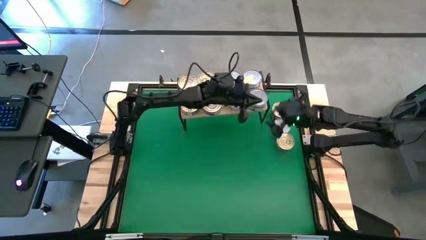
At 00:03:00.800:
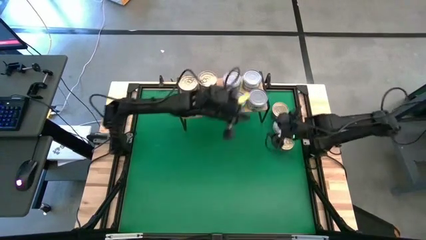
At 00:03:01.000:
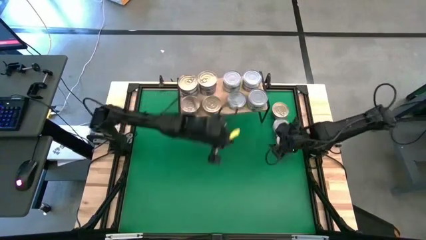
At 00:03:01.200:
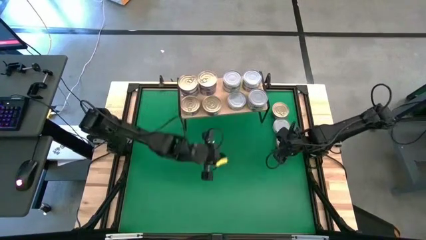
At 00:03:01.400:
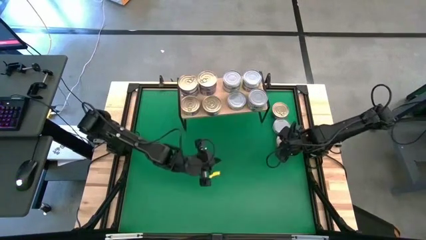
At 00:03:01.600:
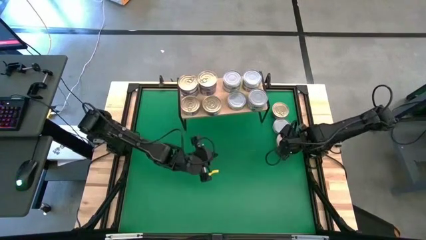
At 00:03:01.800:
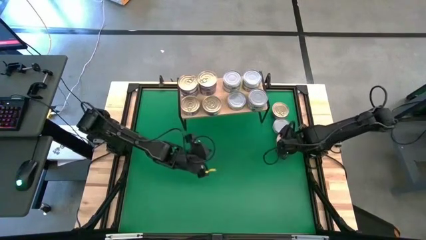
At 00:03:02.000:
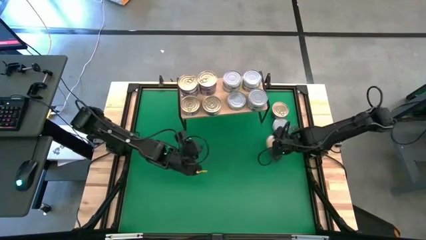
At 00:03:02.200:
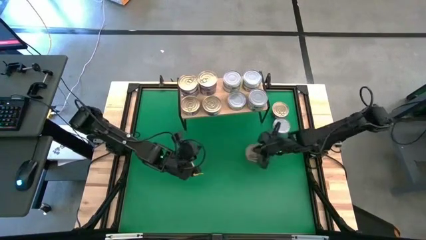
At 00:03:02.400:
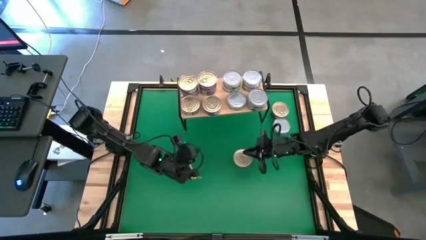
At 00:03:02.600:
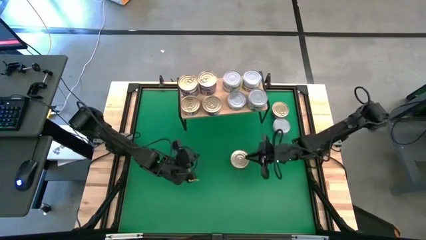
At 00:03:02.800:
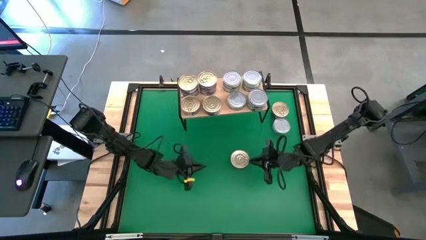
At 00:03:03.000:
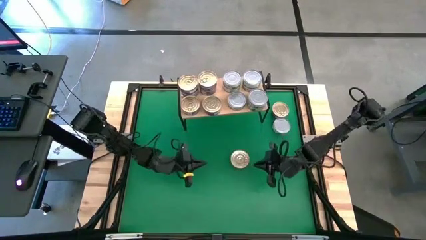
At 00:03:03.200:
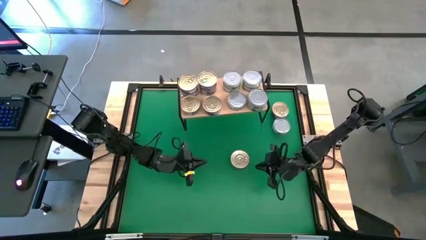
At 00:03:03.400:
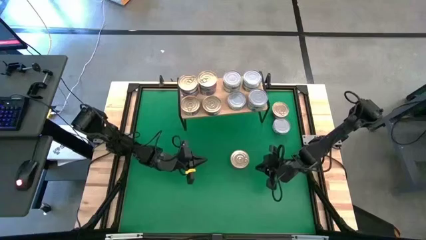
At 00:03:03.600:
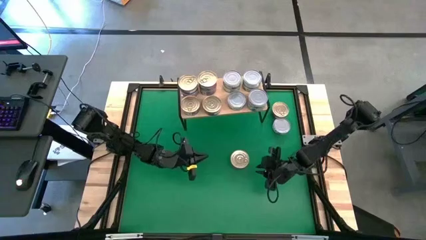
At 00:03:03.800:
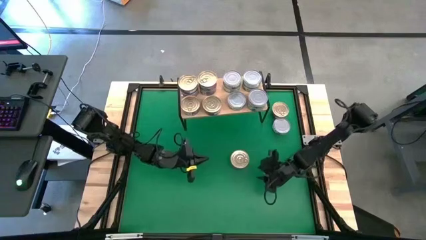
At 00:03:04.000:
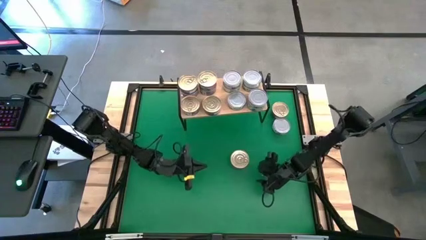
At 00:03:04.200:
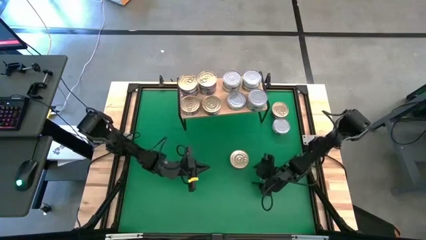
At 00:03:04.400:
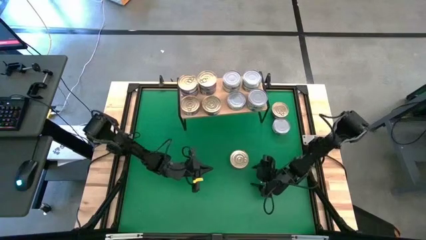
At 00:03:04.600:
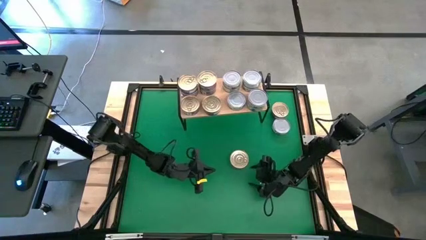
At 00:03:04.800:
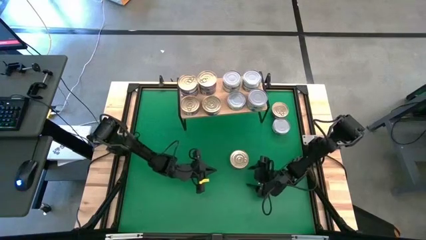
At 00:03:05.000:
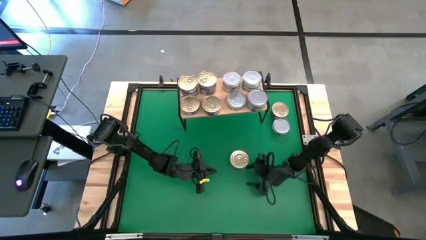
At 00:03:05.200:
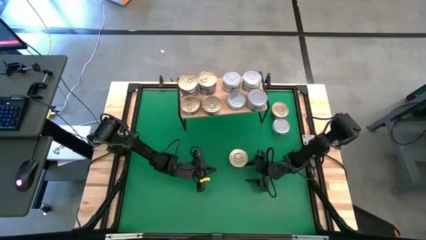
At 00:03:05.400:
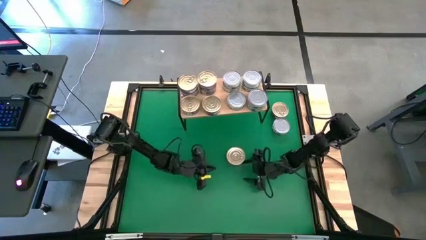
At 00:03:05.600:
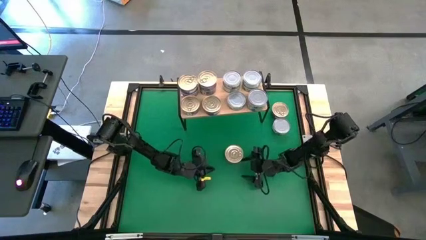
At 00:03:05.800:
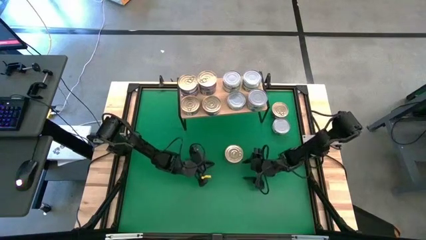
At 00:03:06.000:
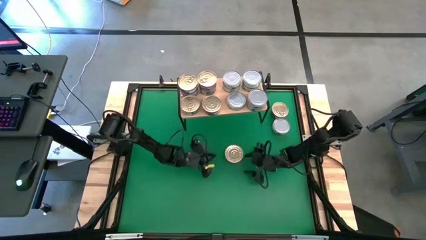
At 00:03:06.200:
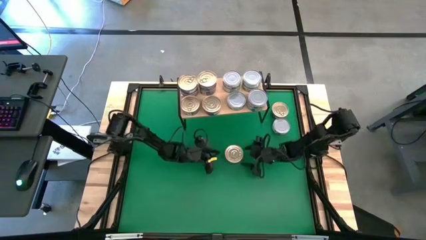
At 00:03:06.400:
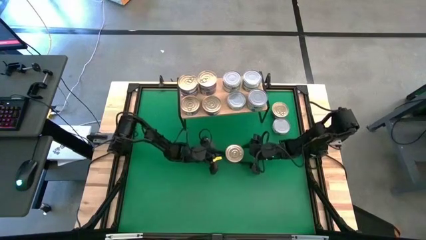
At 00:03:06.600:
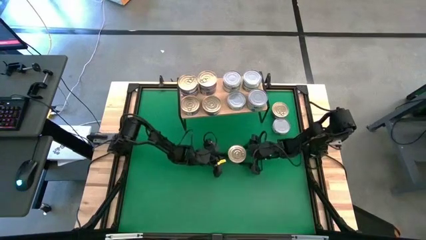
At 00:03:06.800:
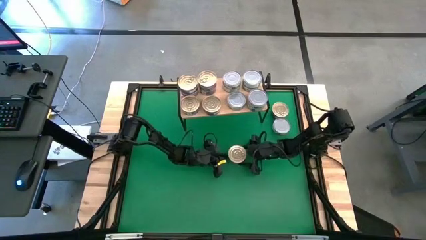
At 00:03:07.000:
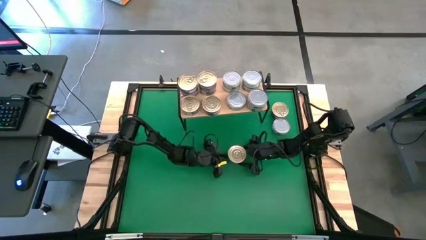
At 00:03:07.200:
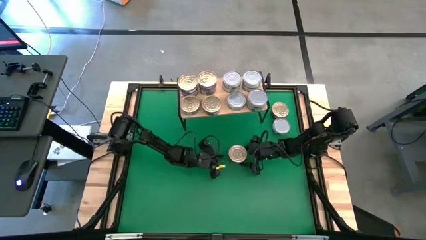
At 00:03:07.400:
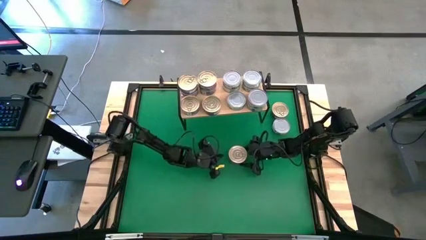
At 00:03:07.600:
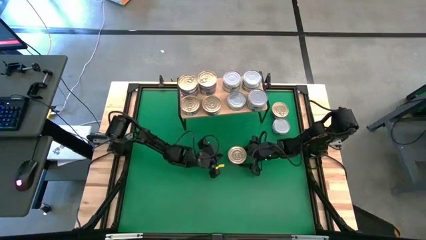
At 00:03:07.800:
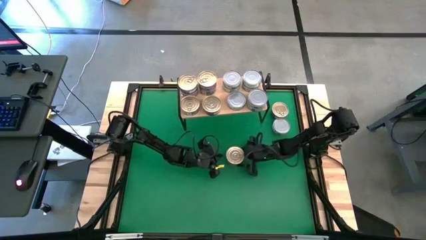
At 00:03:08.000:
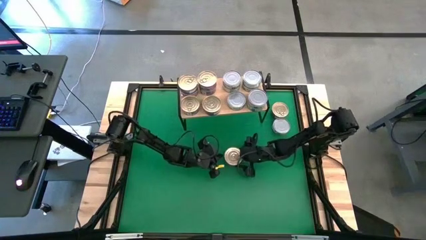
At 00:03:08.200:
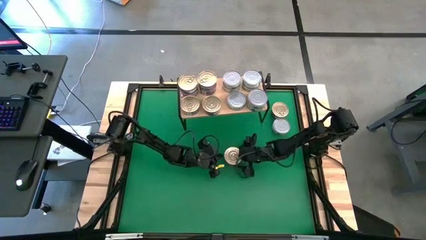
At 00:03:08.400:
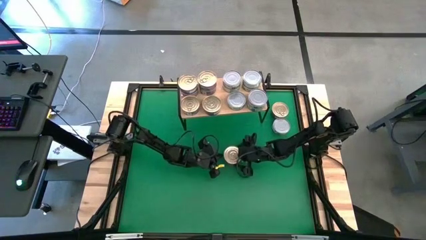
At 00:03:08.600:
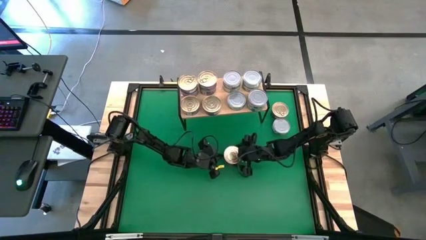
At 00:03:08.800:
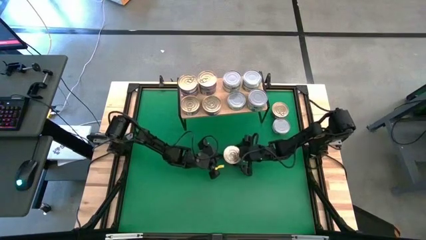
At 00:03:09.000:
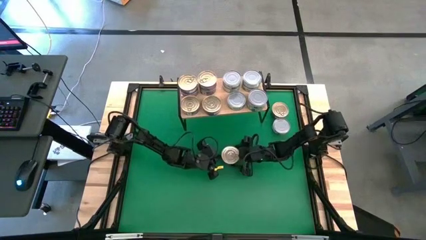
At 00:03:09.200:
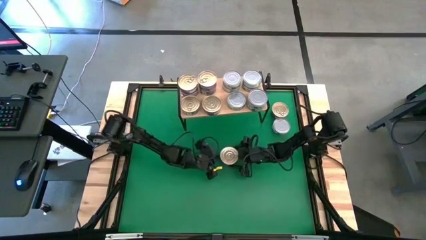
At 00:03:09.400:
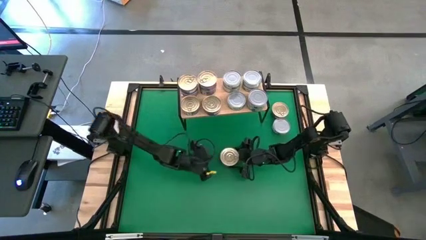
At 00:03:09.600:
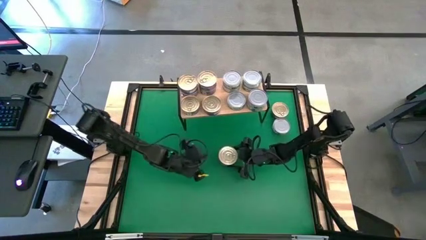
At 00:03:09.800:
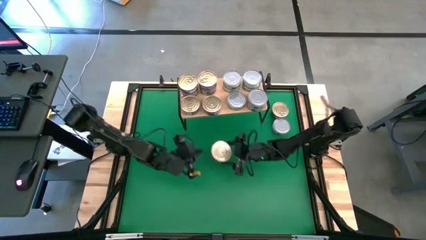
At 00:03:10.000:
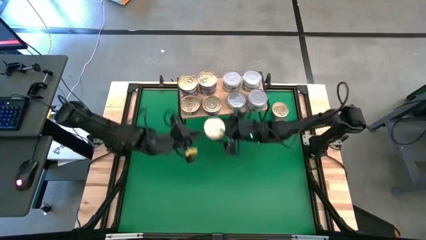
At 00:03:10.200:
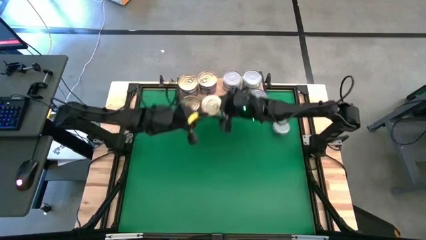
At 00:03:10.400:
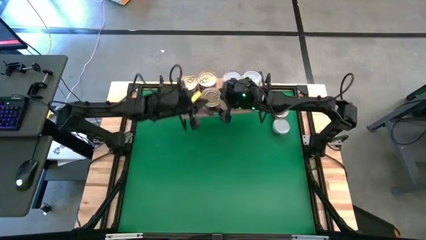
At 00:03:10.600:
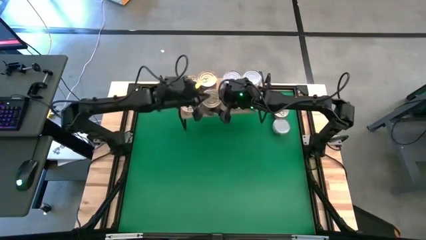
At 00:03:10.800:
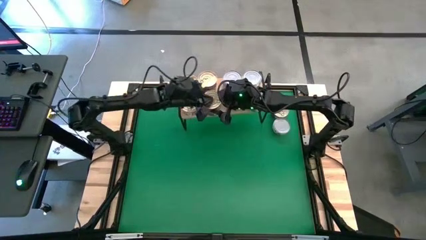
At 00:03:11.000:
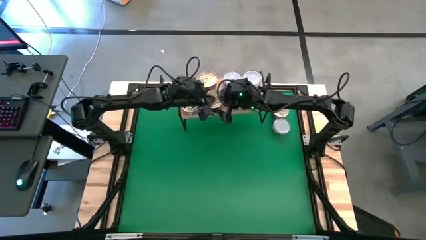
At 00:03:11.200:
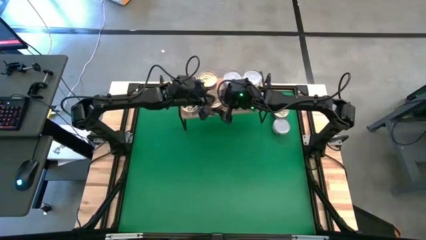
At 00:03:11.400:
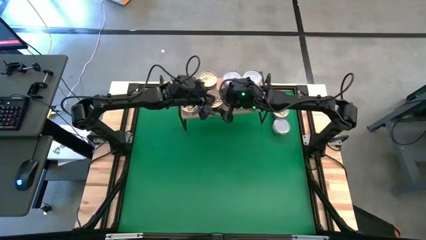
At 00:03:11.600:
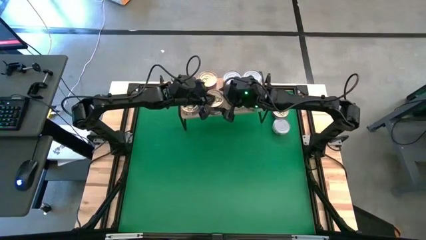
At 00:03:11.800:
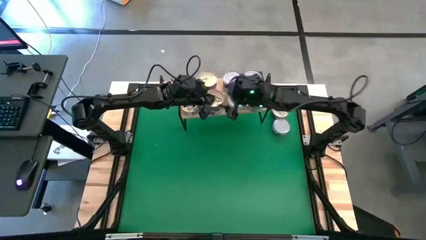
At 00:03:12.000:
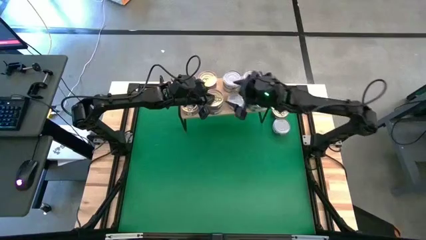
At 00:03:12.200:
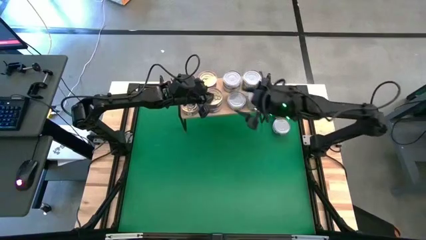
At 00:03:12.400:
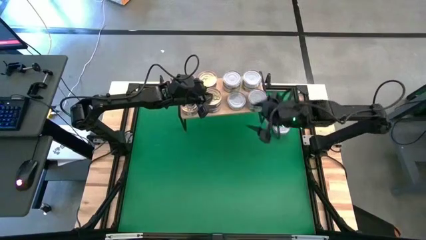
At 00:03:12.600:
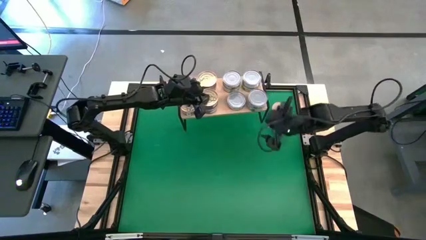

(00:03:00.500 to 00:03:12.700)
Task: Stack canned seafood by type on shelf
Stack the blue tuna can on top of the other blue tuna can on the shelf

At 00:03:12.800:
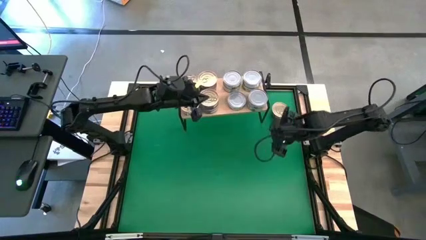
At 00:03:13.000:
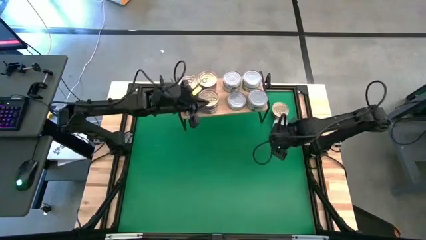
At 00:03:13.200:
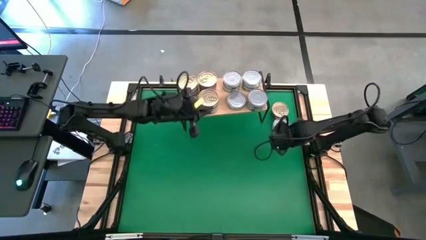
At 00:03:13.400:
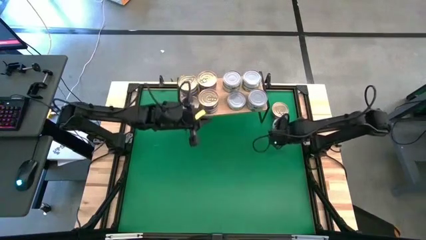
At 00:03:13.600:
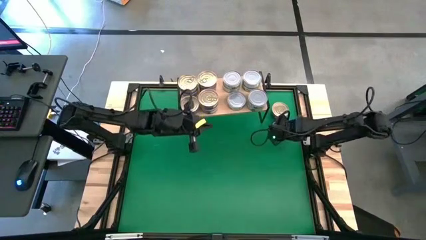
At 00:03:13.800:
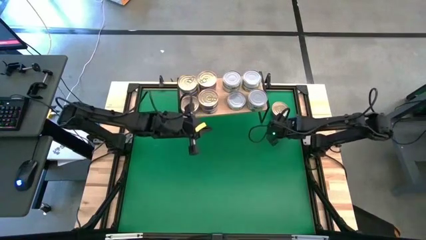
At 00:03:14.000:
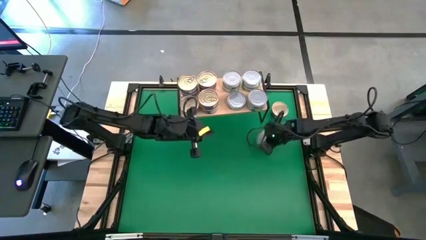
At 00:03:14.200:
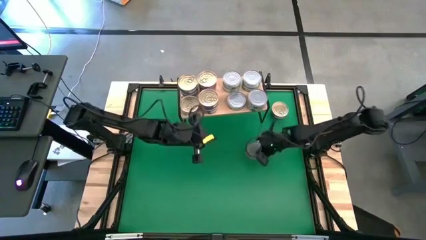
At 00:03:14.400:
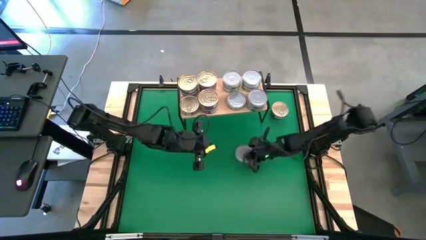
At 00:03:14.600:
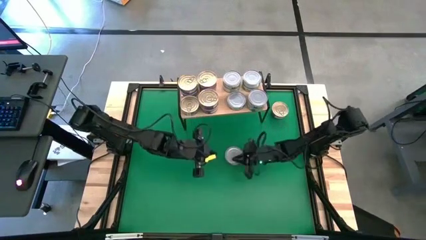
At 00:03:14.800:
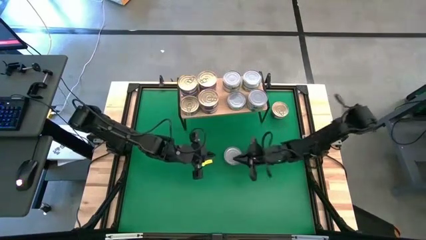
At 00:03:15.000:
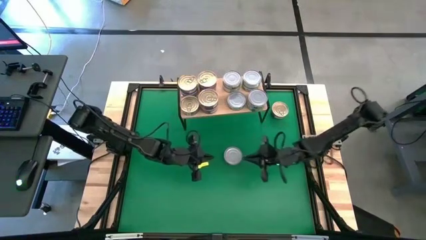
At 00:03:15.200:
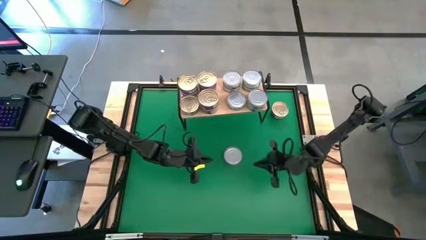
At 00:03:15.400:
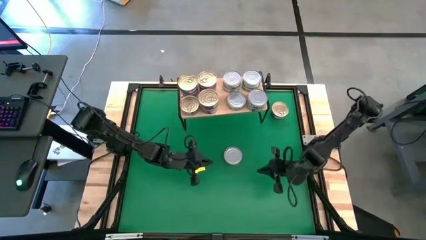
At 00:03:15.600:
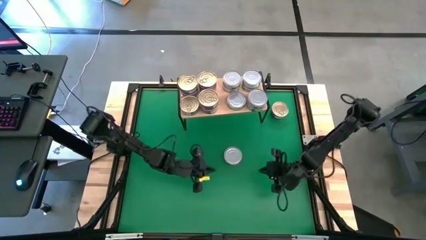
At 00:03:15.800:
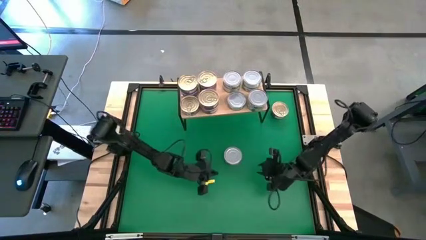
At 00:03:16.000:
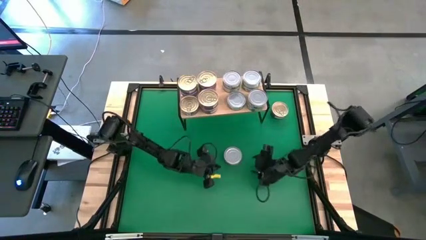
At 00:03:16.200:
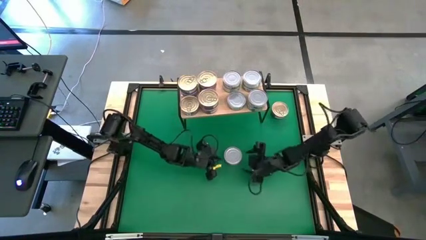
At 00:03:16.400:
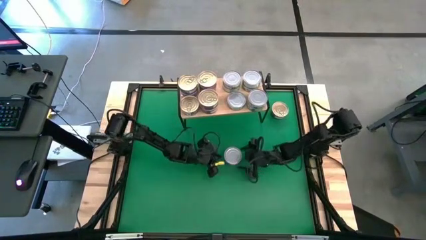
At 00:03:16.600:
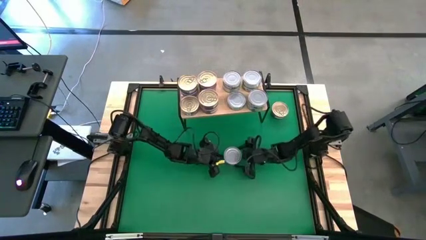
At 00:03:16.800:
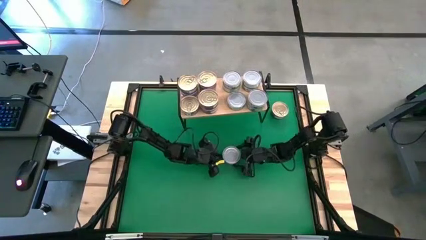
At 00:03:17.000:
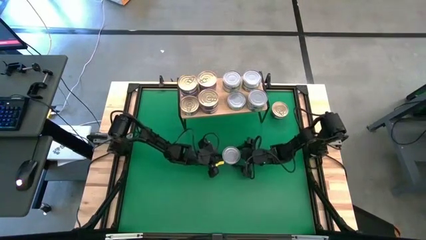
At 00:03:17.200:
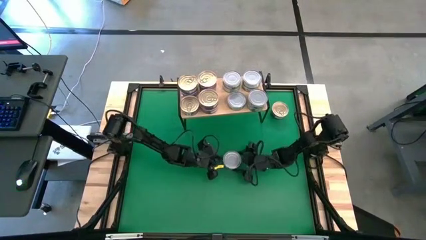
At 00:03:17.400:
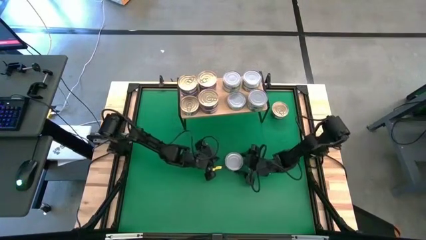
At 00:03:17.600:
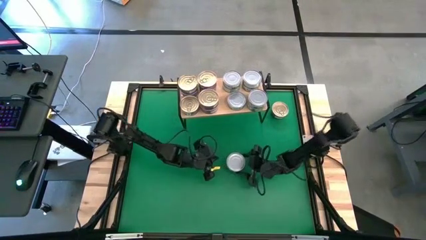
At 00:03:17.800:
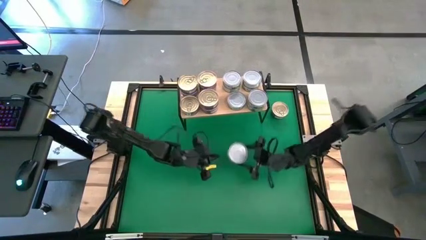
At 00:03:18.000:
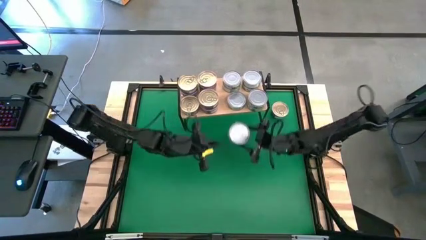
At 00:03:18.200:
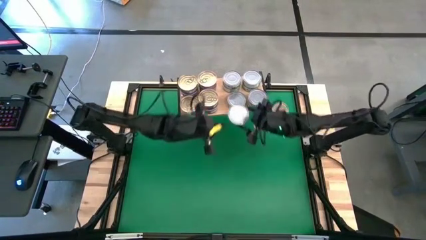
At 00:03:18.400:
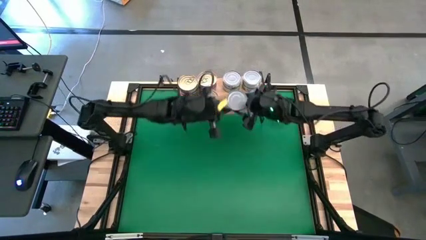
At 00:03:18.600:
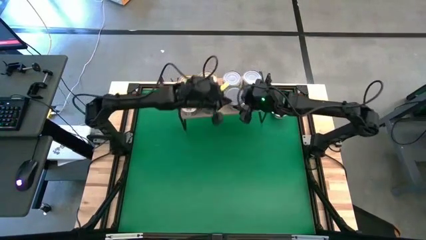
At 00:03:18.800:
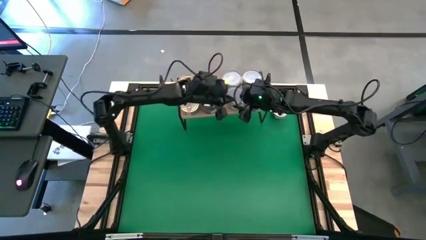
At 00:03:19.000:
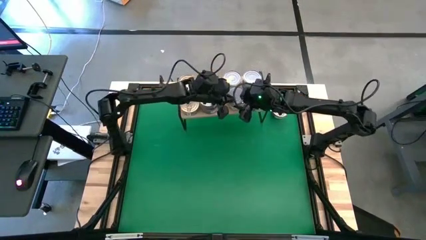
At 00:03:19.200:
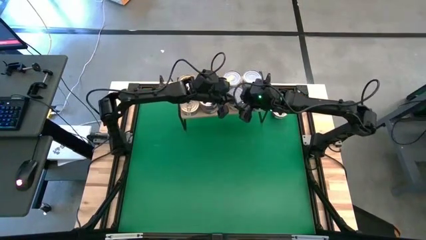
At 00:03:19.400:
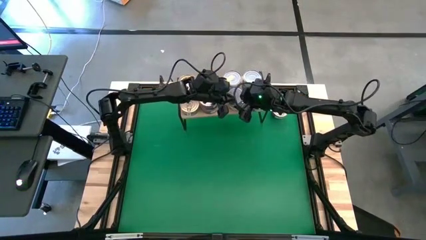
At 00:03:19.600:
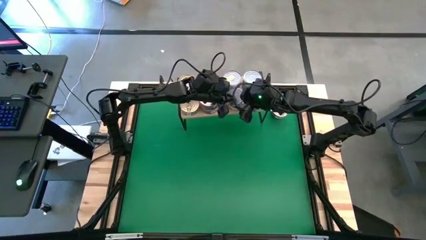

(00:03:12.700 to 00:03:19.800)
Stack the green tuna can on top of the other green tuna can on the shelf
